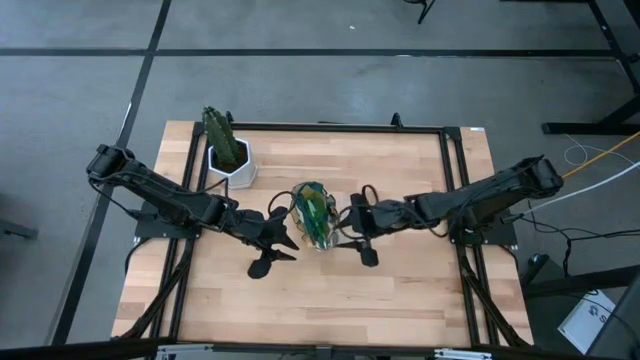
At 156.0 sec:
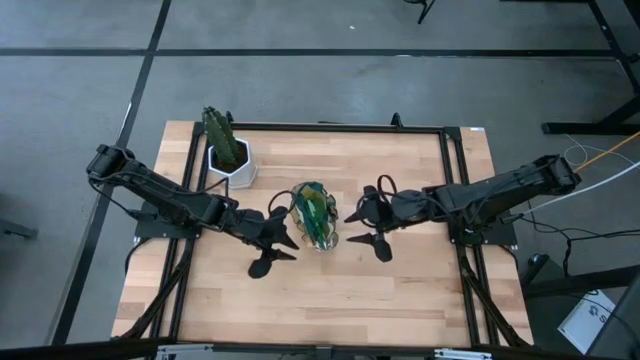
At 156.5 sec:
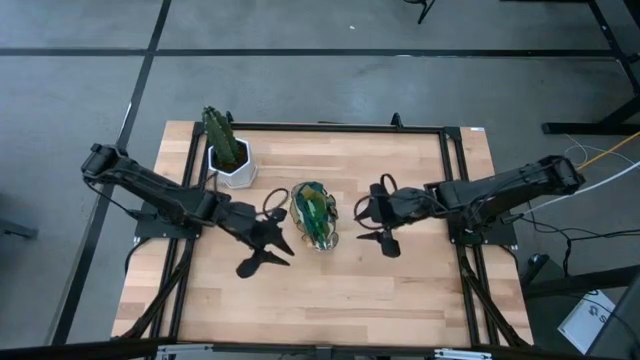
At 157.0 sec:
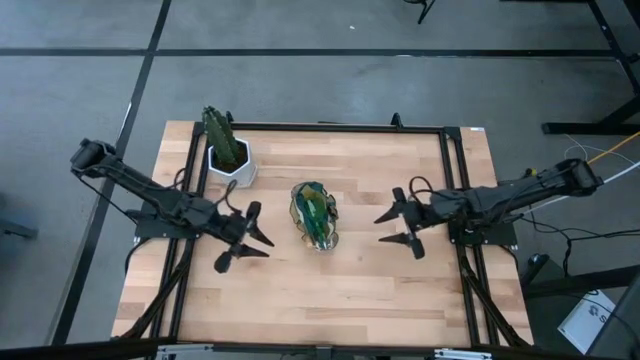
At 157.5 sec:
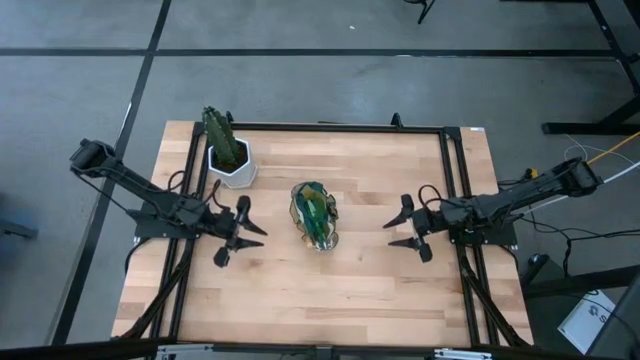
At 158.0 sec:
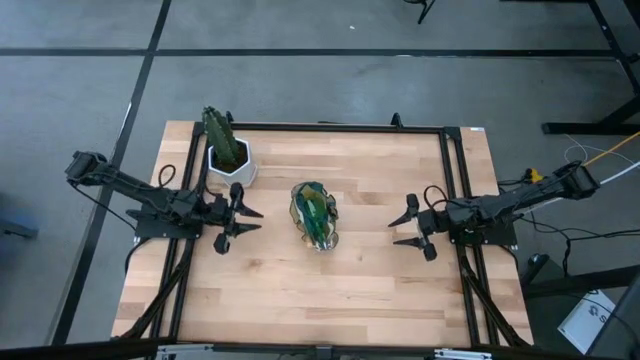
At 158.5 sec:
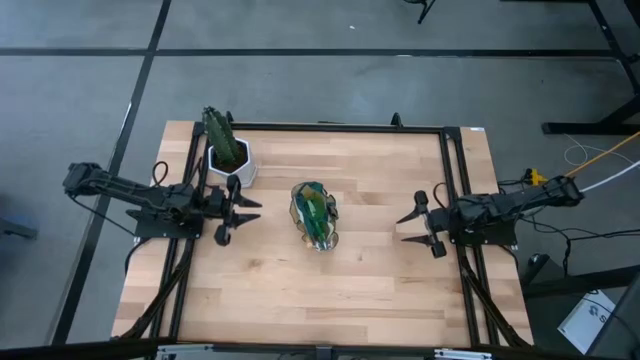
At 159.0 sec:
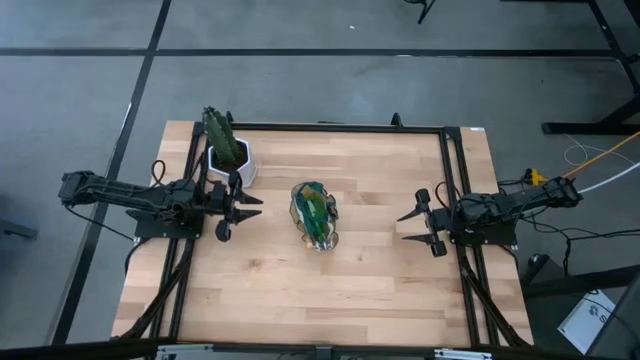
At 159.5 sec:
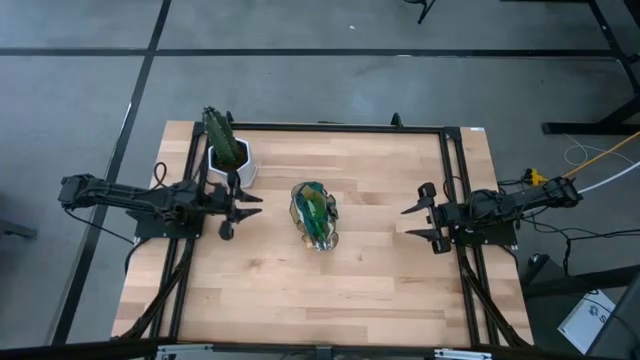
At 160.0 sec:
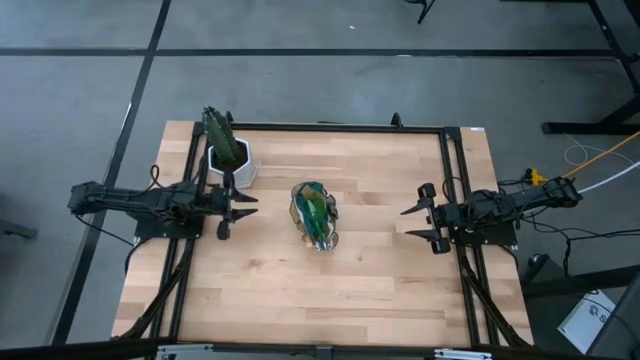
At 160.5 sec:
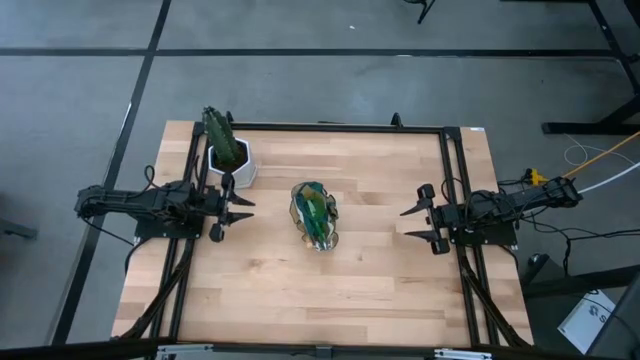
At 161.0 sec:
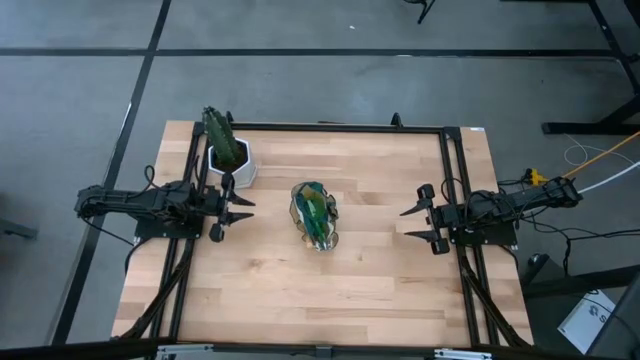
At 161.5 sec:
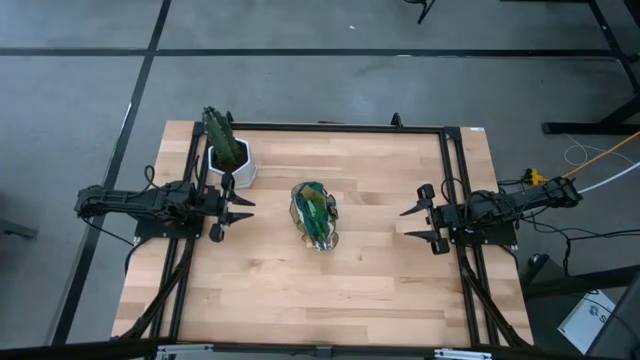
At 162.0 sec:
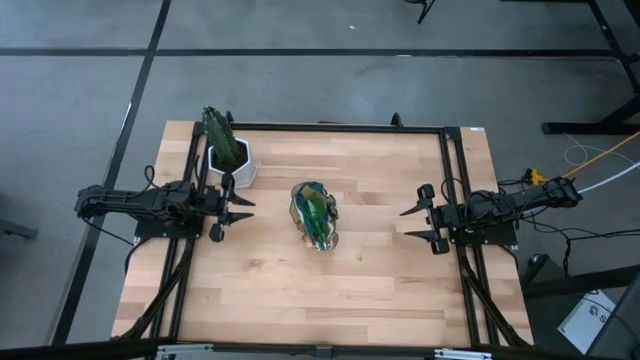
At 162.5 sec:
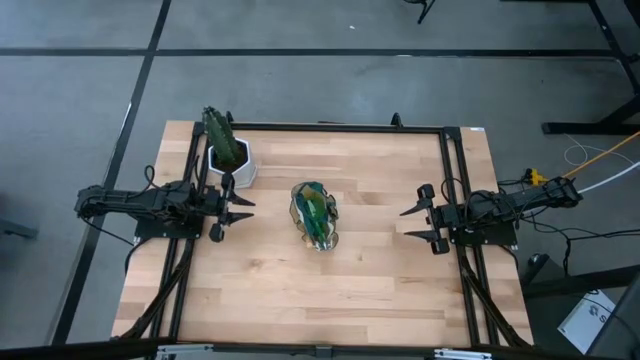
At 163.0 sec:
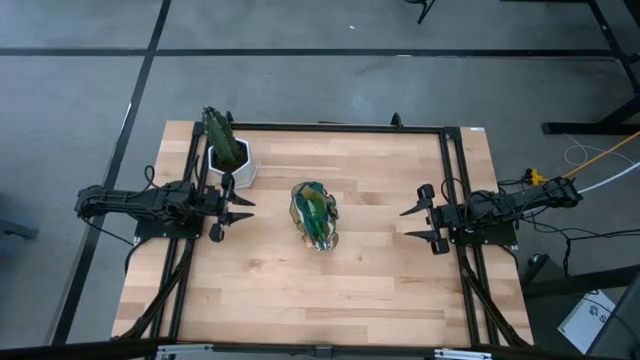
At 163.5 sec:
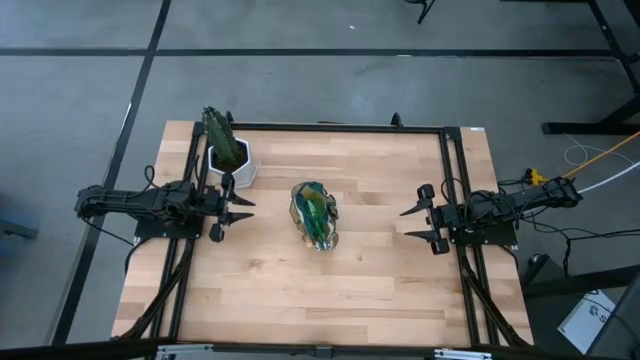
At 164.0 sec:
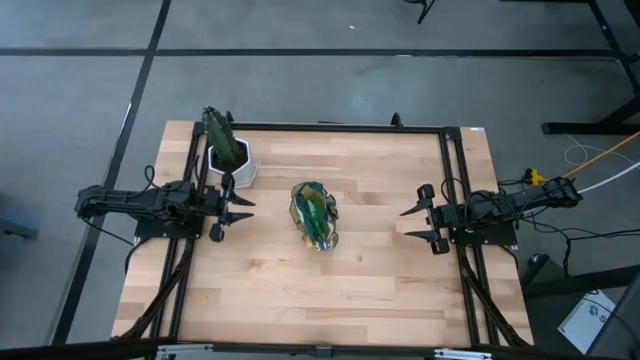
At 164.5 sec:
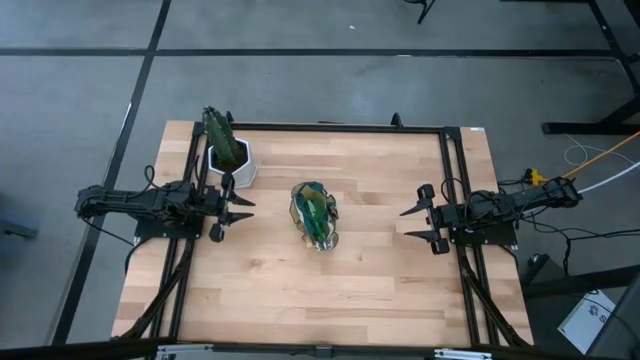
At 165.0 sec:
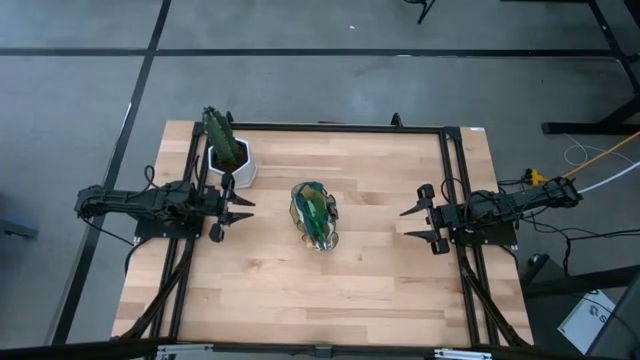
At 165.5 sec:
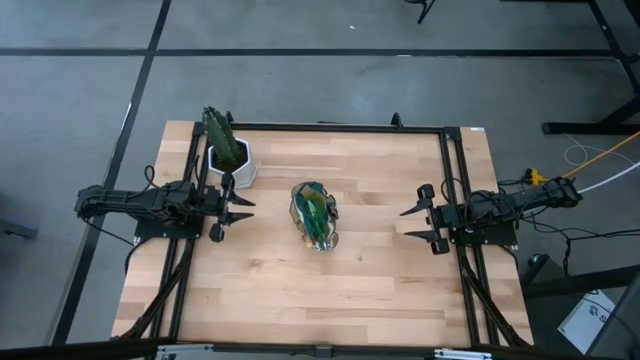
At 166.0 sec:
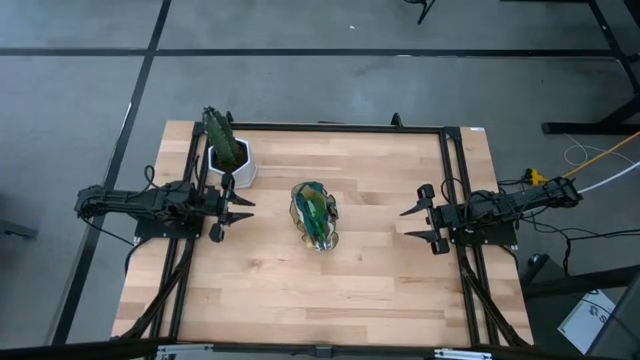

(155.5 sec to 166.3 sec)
Task: Pick & Place Garden tools in Gardening bag
Return to Home Position

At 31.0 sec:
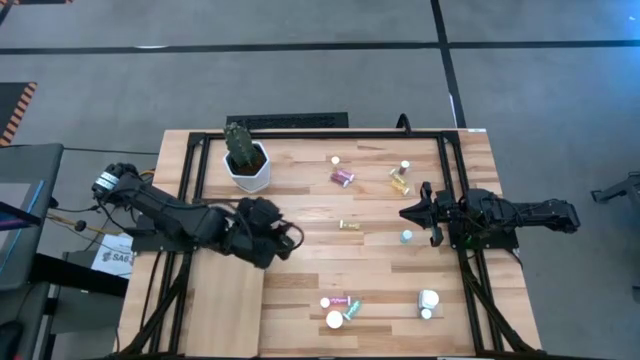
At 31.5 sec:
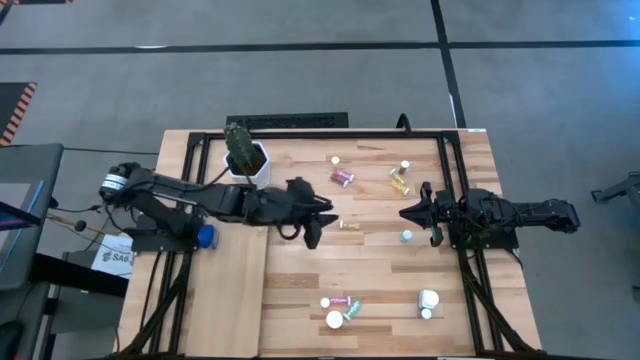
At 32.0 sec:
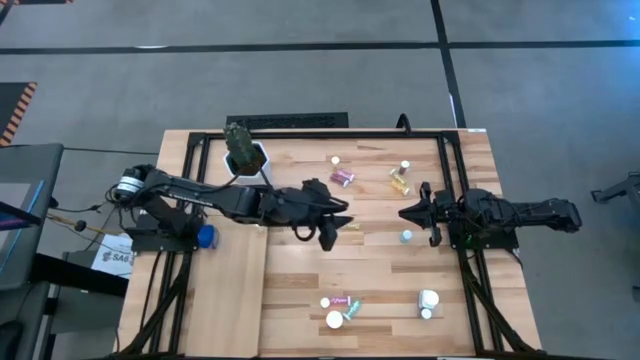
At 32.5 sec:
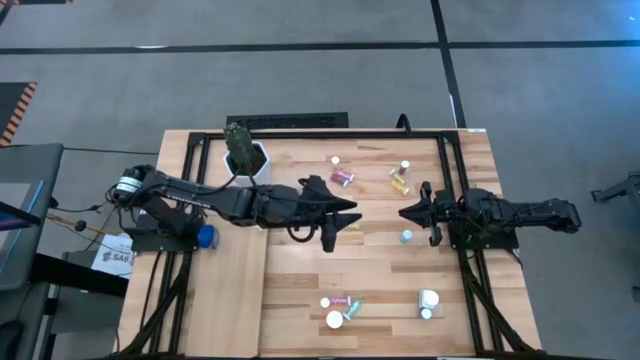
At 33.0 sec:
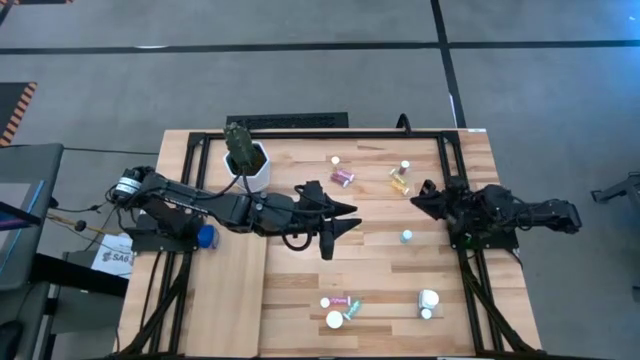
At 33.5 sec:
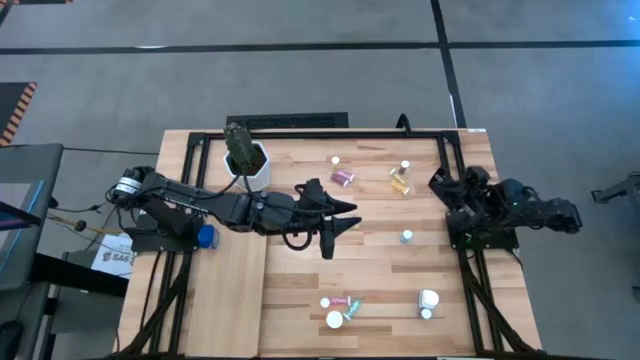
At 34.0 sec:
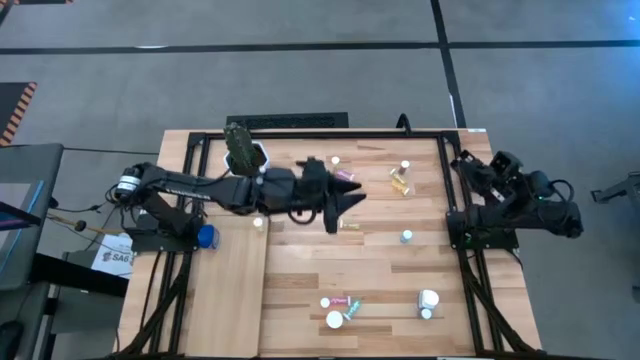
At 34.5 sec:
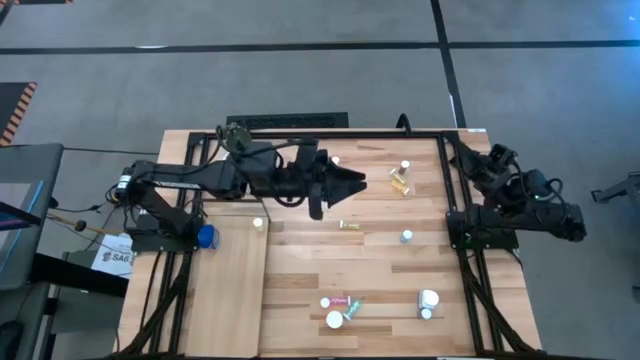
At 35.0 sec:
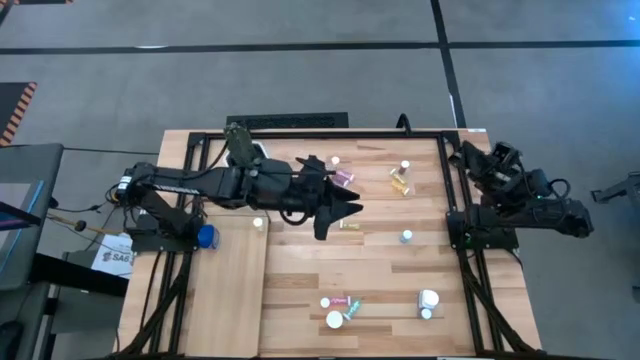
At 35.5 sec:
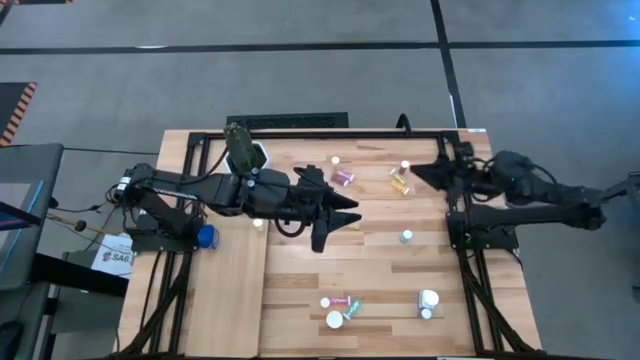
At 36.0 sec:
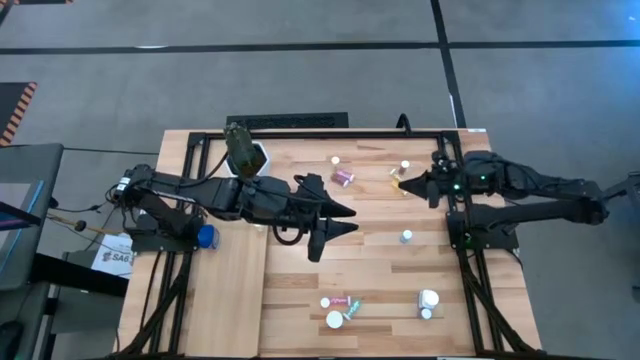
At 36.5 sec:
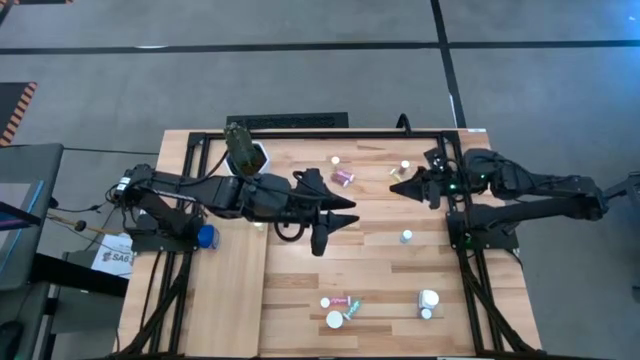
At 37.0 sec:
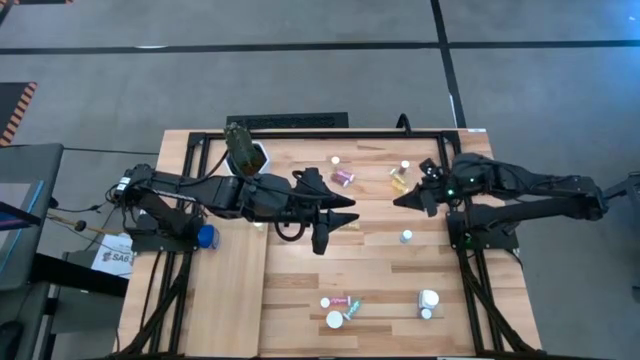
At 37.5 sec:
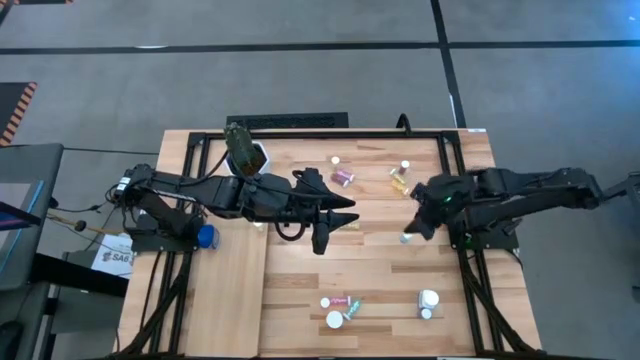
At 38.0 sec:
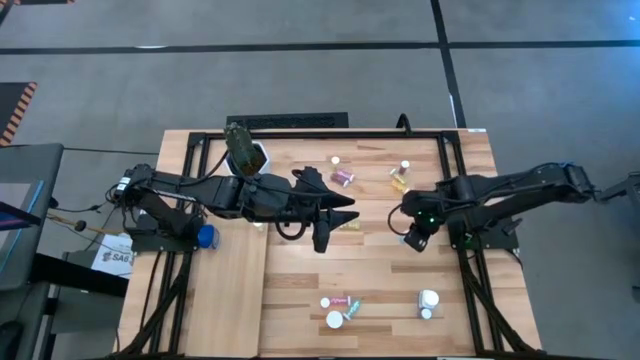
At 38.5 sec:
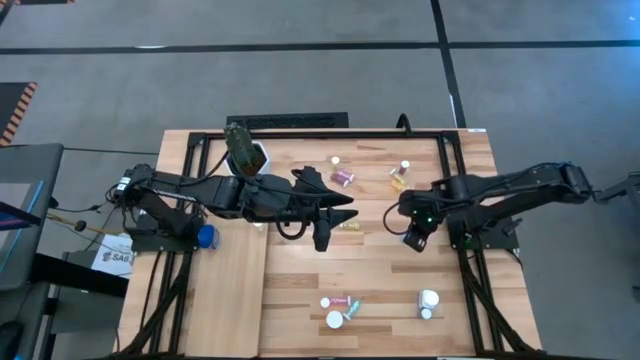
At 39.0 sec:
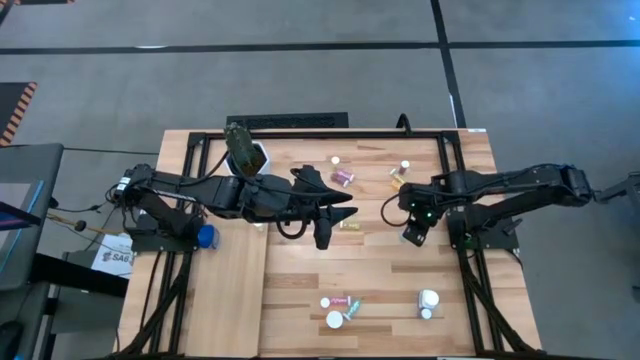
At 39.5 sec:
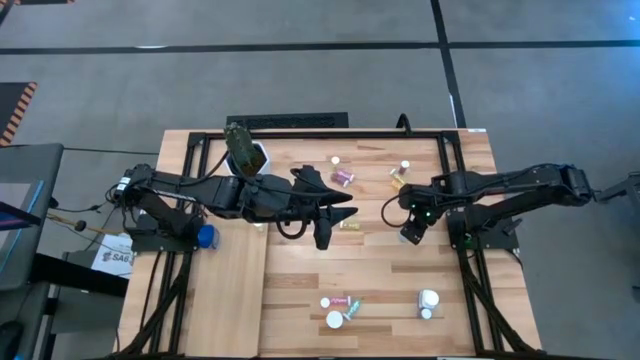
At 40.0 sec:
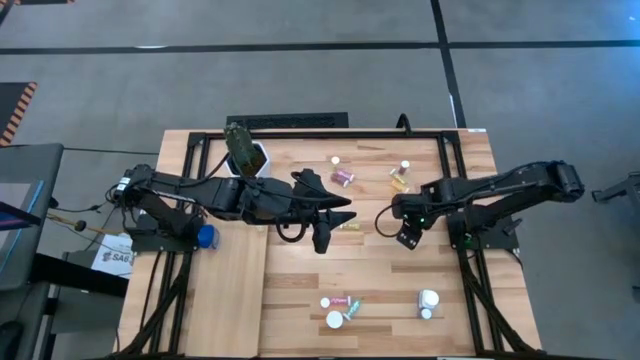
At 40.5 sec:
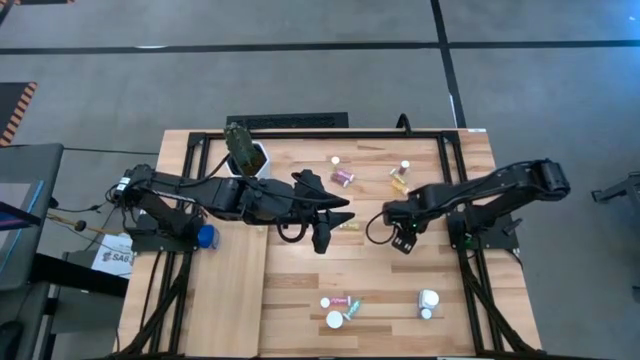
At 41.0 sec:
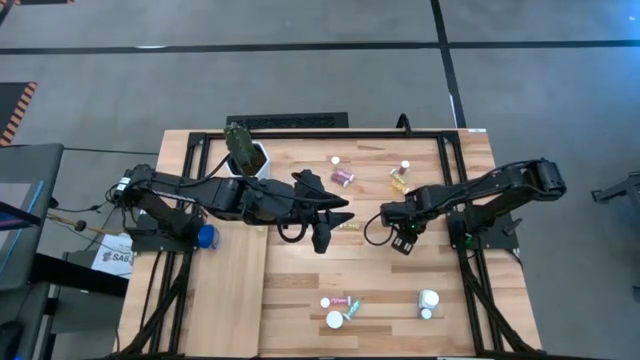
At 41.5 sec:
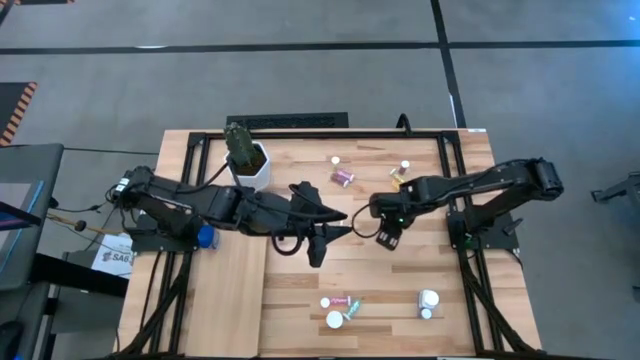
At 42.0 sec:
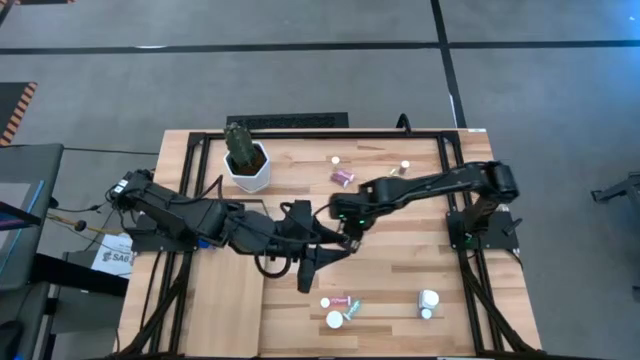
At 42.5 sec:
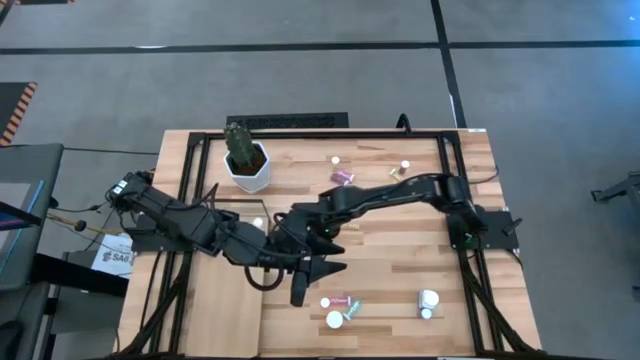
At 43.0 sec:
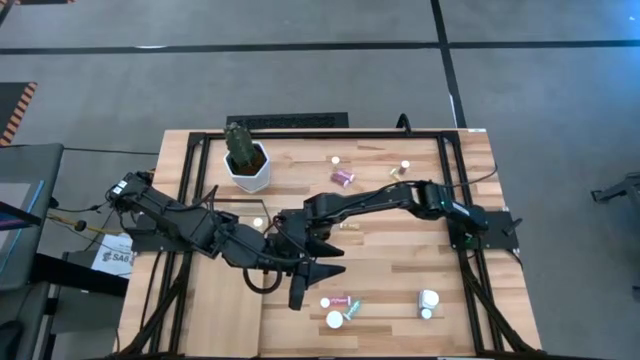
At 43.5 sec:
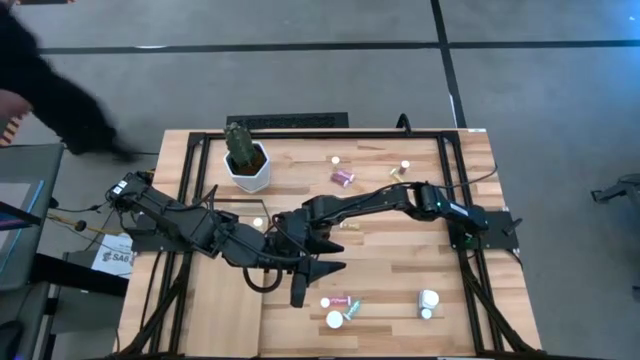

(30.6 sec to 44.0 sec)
Task: Pick and place medicine bottles onto shelf by color
Move the light blue pill bottle to the middle of the table
